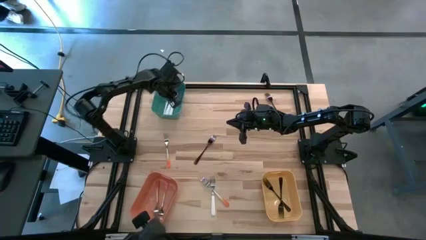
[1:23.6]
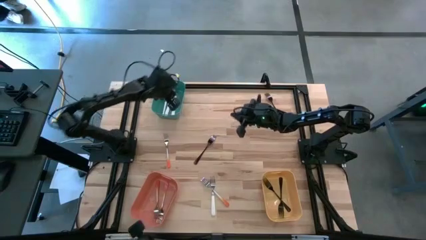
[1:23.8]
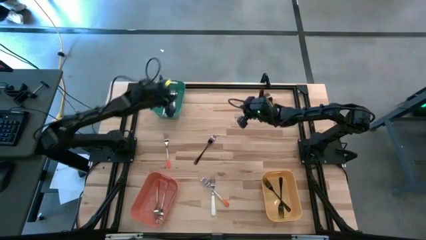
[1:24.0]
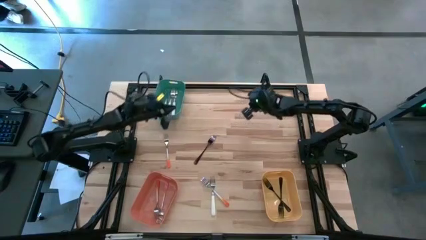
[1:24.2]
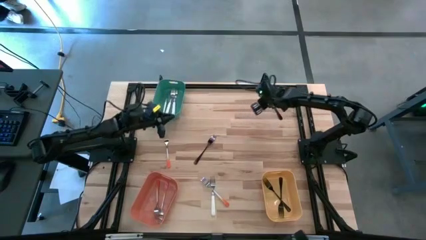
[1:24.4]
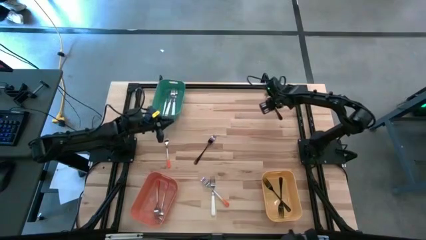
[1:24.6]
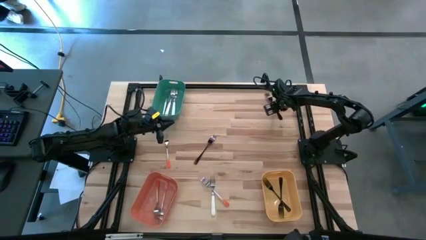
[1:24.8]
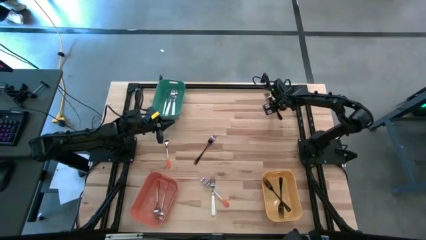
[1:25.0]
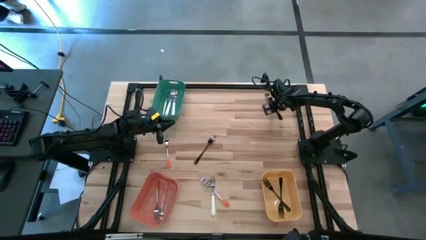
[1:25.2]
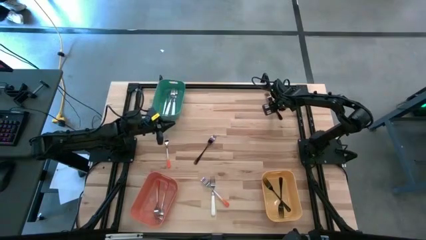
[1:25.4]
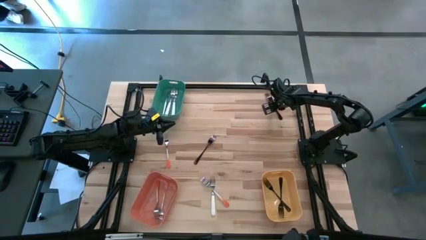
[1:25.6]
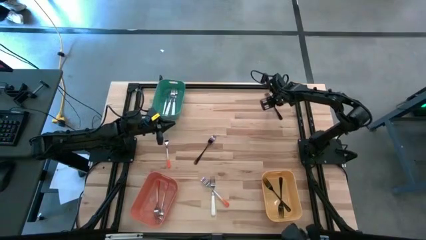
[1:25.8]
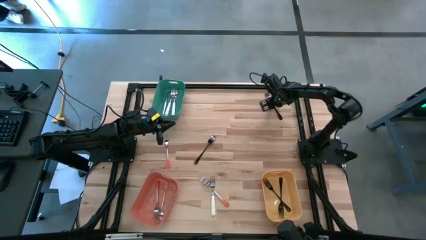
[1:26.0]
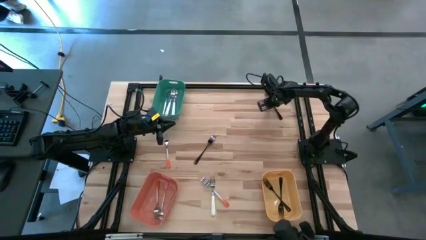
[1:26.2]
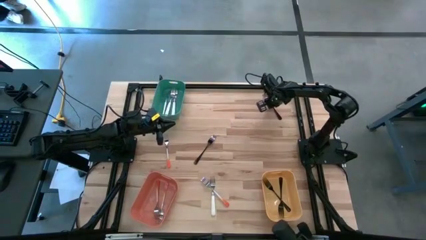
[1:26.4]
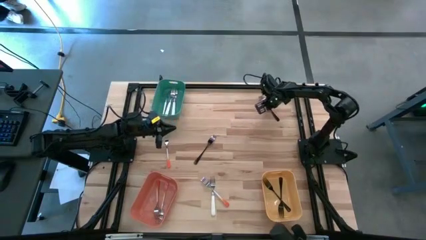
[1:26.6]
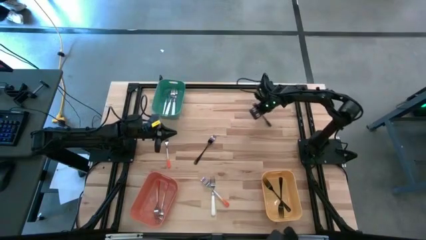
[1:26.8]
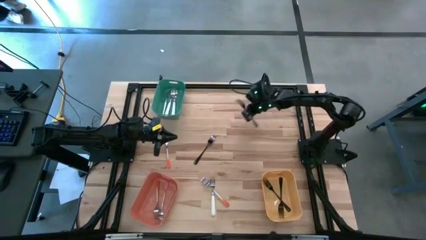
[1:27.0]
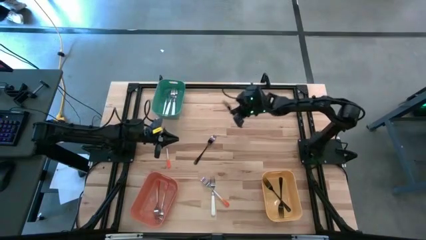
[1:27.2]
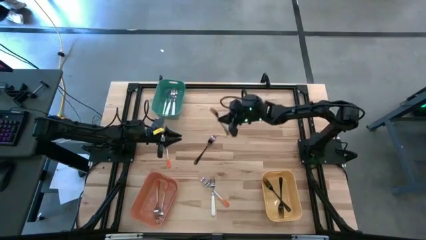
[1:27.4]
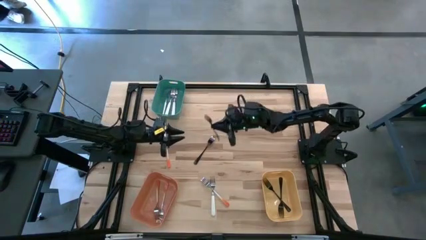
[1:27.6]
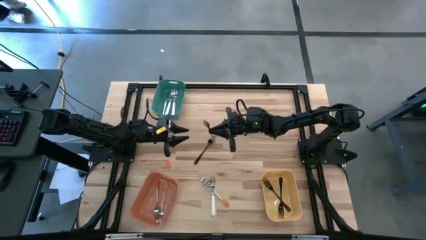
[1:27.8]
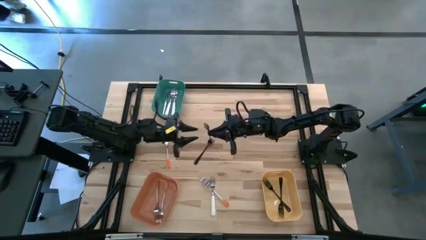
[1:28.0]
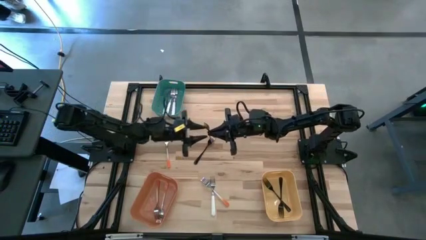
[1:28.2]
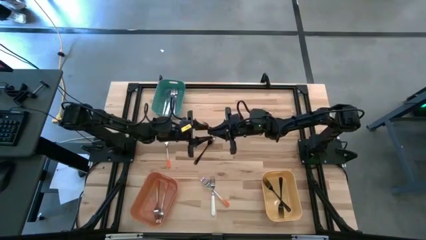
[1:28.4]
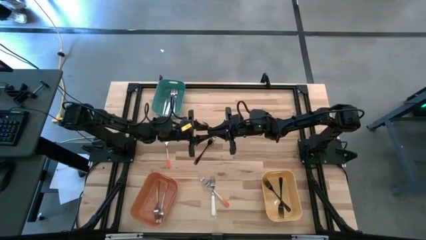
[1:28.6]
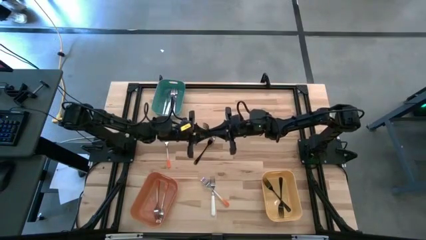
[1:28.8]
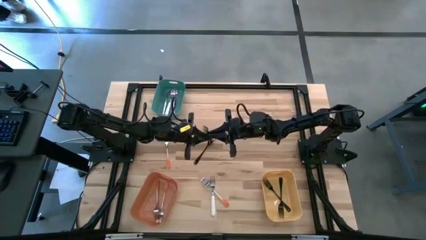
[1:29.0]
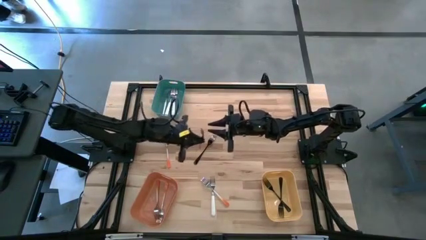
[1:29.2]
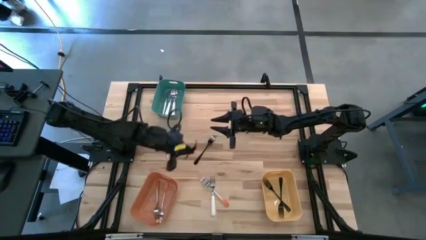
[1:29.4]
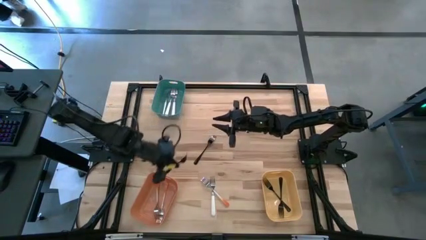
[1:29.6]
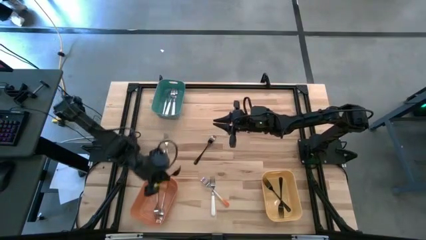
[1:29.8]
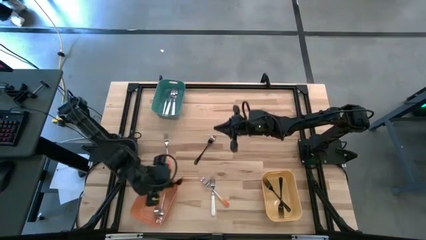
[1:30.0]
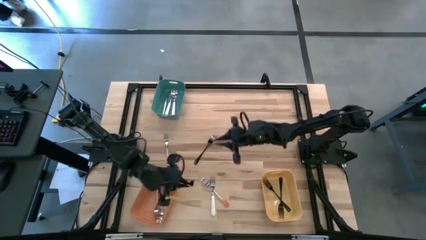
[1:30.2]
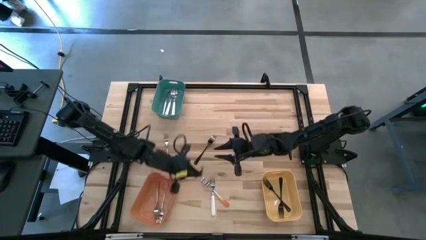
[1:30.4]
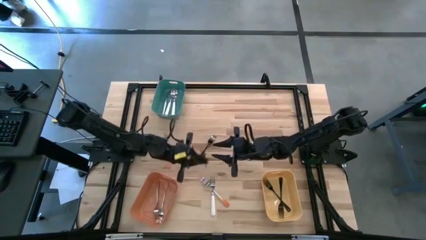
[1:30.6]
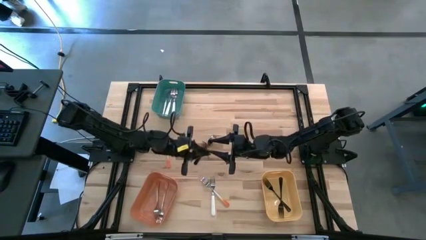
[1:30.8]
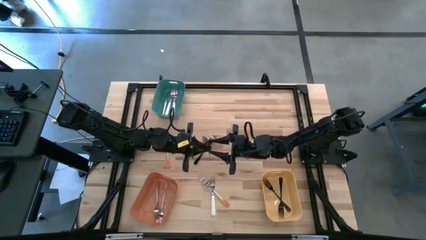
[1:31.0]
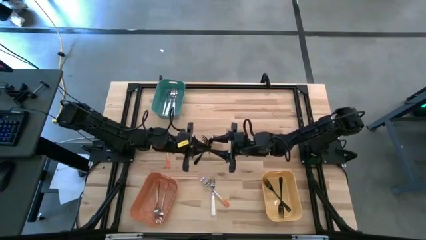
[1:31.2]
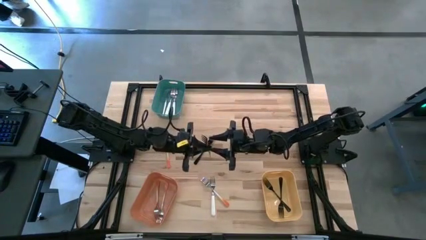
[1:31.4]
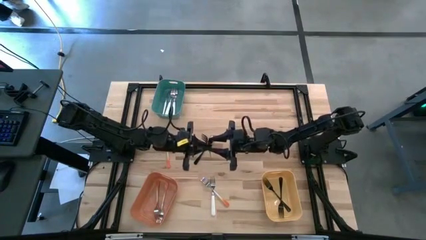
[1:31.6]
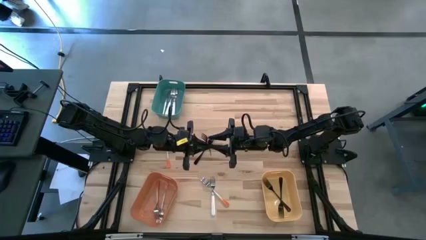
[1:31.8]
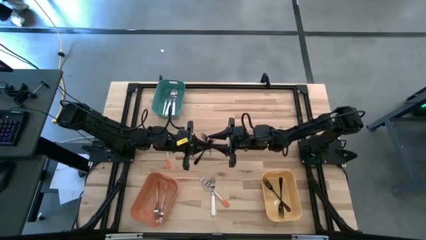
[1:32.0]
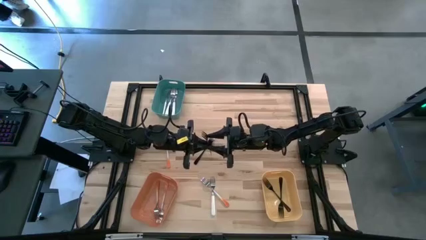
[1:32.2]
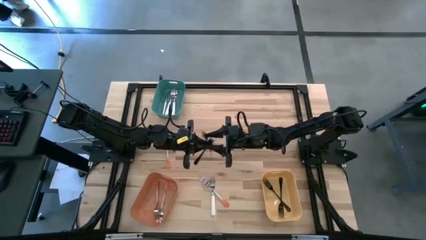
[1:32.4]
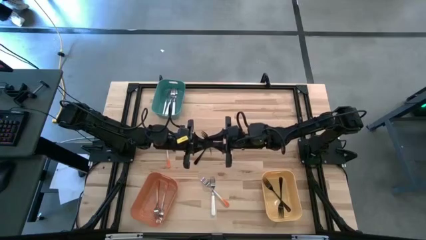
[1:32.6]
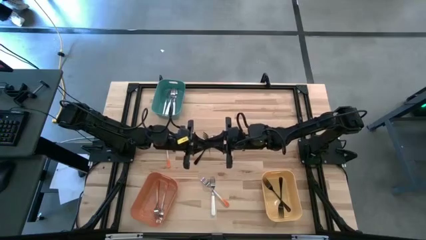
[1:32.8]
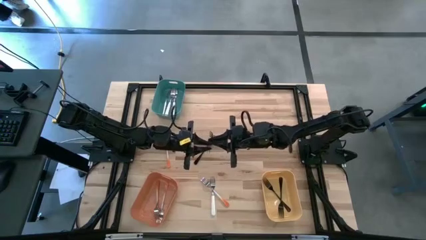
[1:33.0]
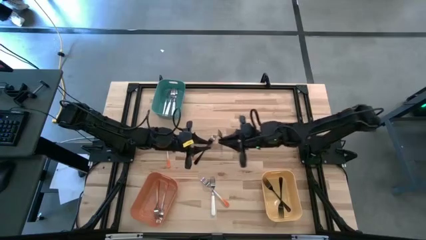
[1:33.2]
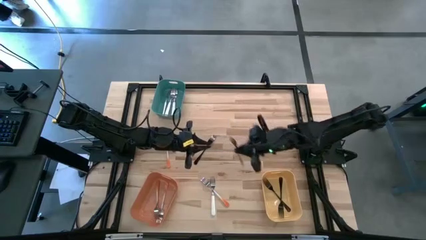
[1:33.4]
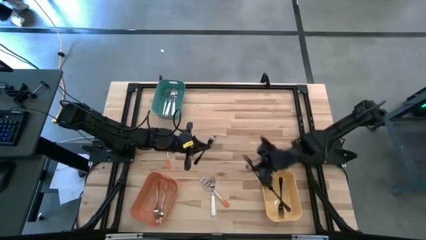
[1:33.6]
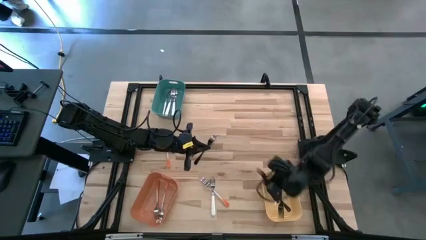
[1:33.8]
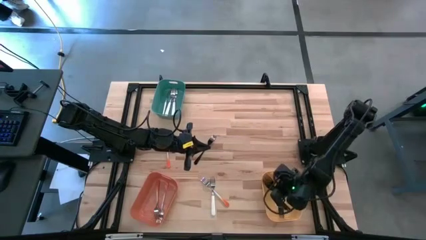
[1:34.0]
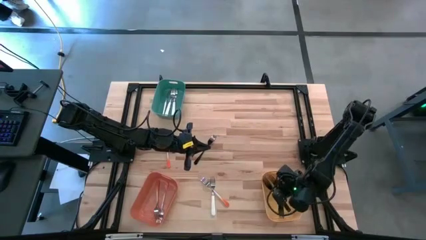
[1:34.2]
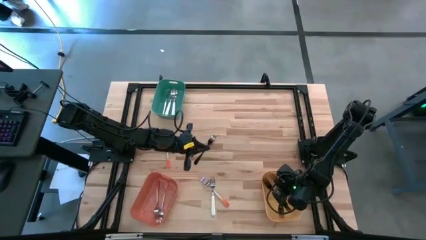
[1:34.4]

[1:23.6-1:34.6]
Task: Sort silverware by color (type)
Put the black fork into the yellow bin

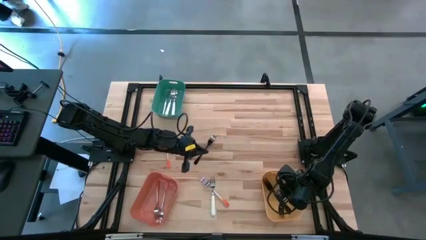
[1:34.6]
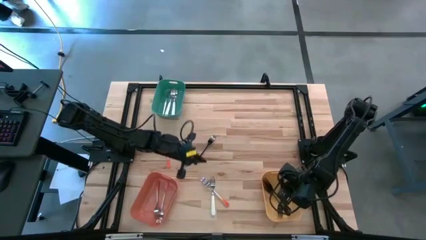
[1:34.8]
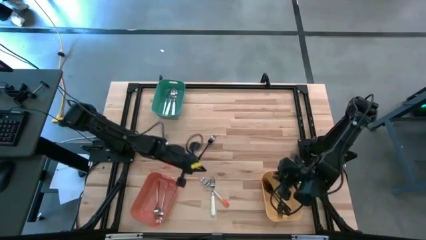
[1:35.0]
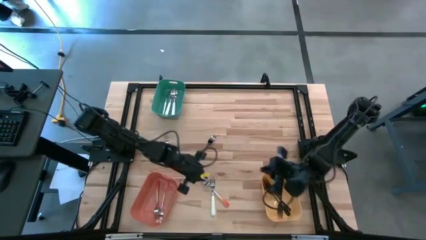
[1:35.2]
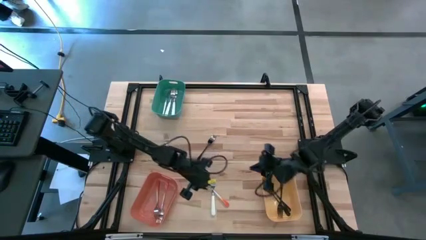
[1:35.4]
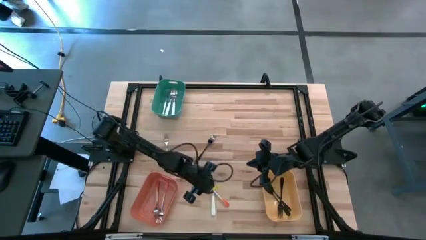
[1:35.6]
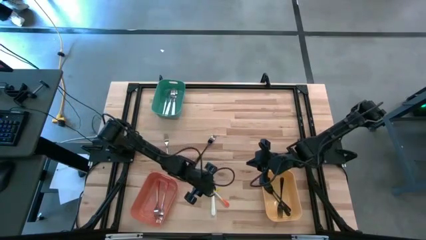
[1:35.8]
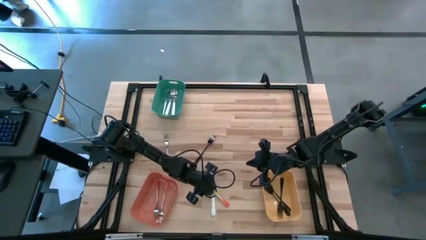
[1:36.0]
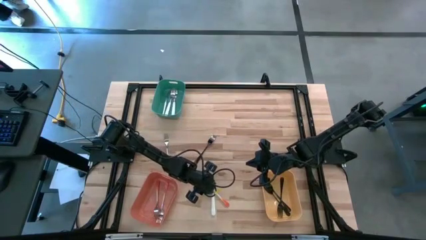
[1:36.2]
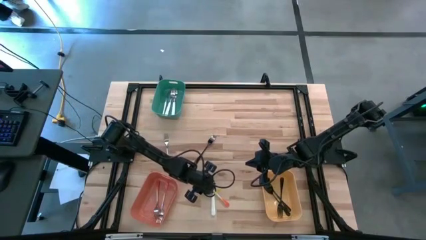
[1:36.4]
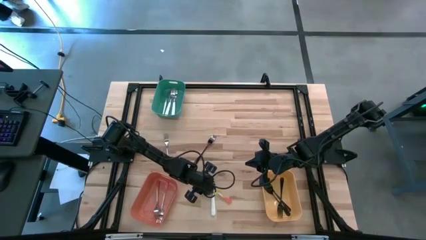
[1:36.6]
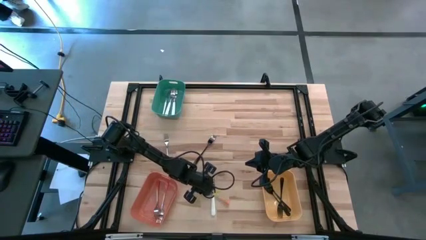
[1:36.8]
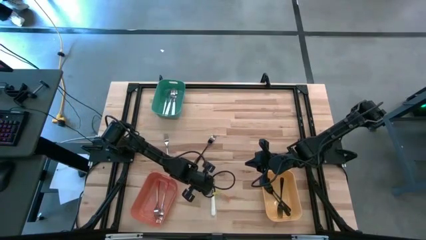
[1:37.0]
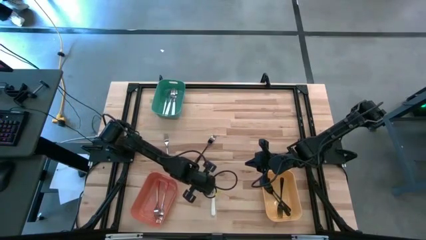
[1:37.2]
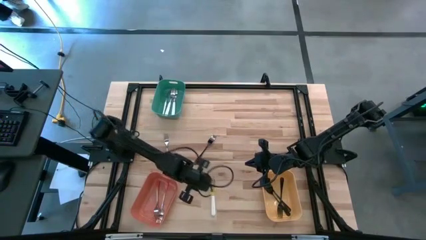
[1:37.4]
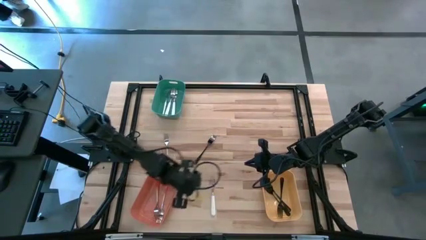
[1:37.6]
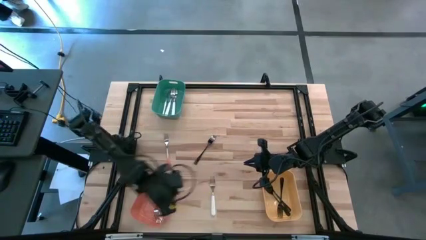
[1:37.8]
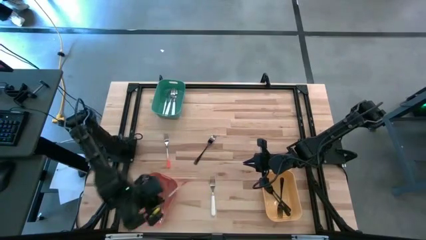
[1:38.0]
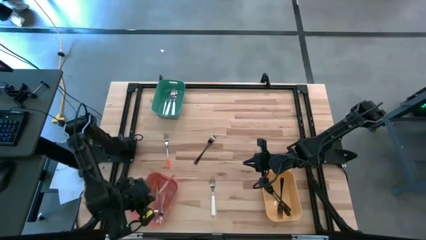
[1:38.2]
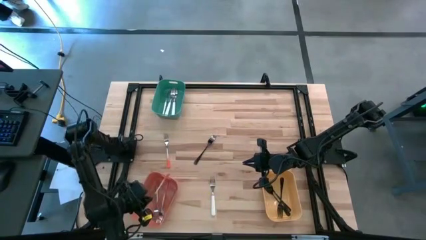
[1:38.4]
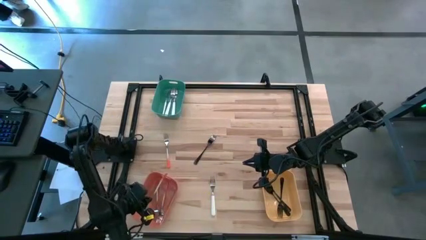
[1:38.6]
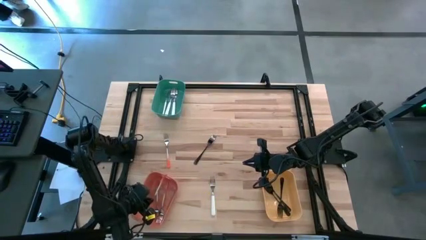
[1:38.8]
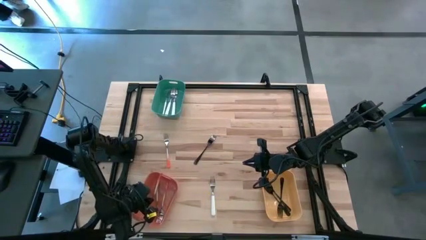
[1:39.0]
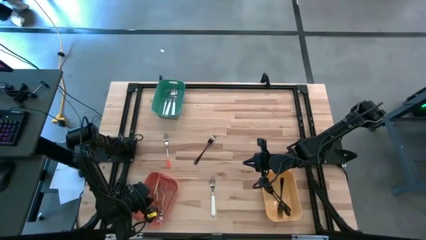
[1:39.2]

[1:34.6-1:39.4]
Put the orange fork into the orange bin
